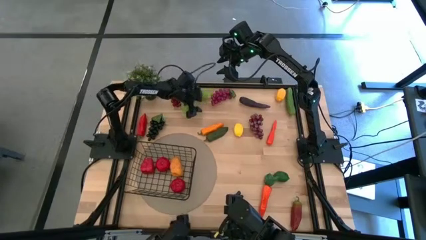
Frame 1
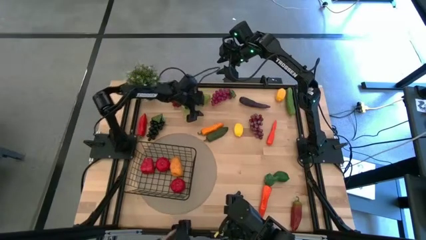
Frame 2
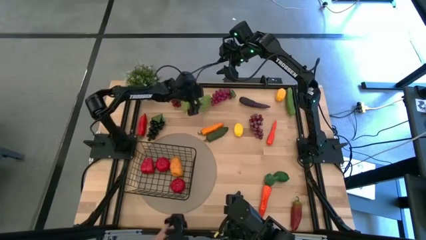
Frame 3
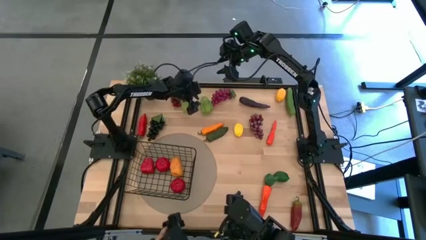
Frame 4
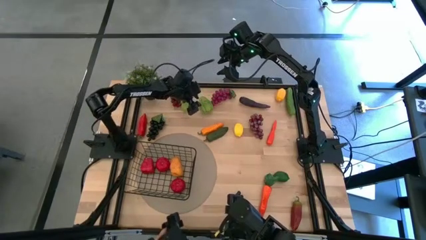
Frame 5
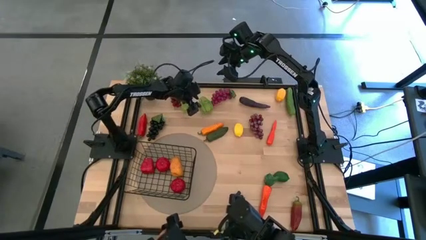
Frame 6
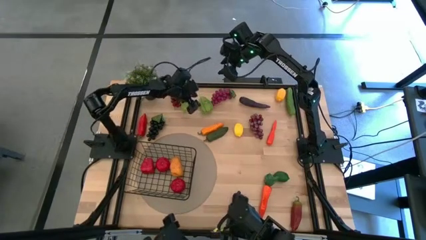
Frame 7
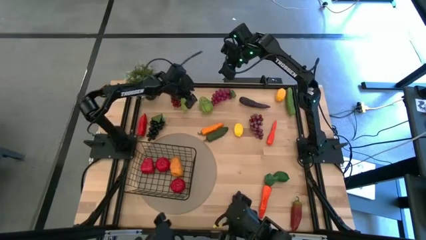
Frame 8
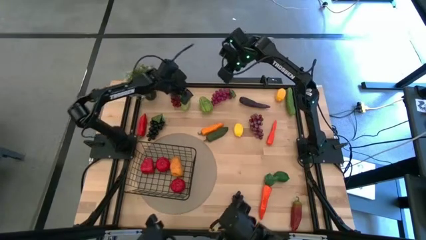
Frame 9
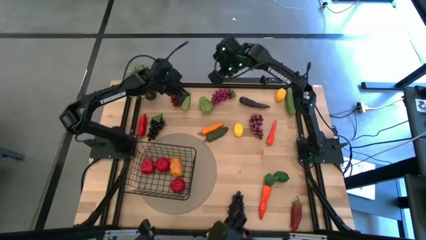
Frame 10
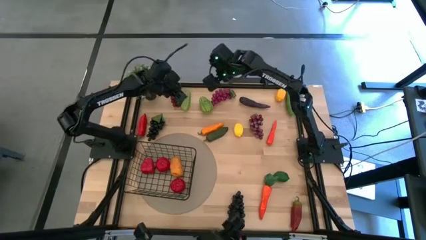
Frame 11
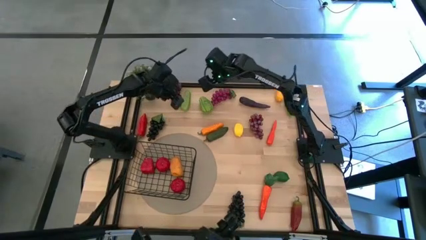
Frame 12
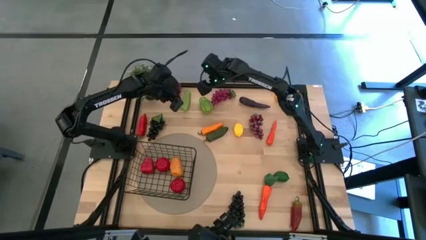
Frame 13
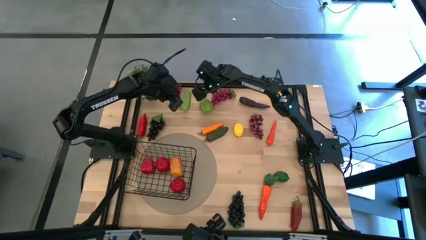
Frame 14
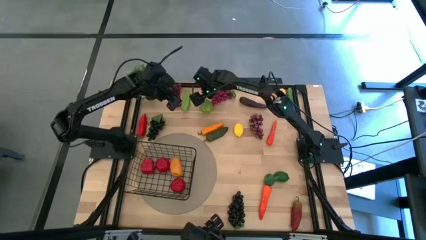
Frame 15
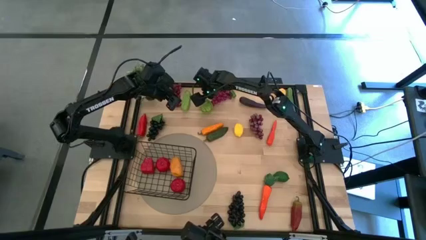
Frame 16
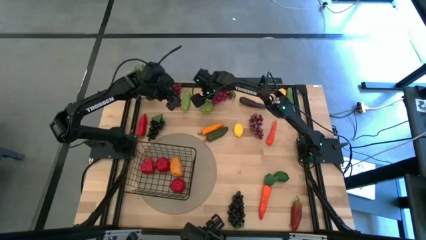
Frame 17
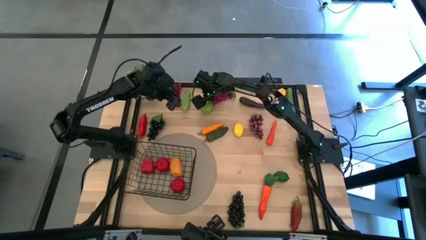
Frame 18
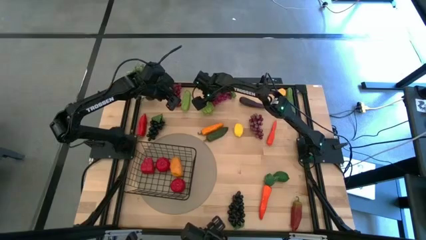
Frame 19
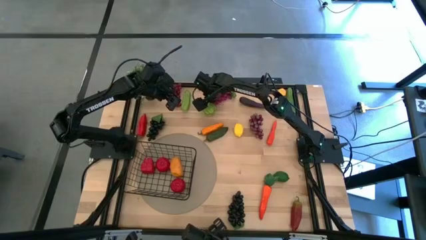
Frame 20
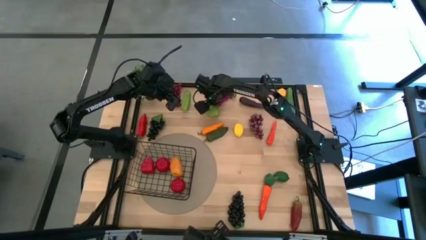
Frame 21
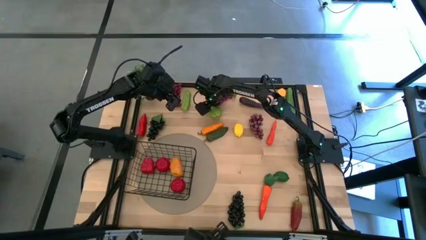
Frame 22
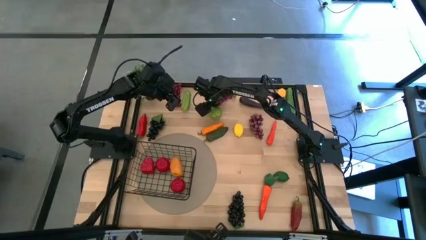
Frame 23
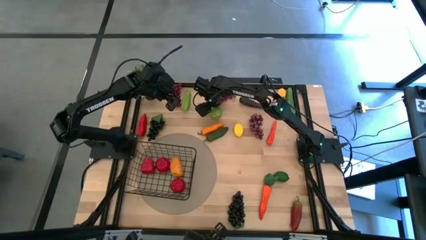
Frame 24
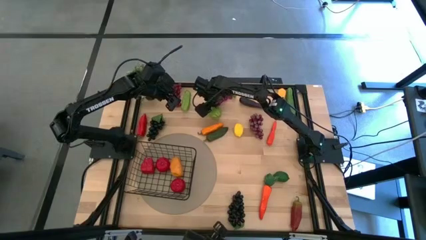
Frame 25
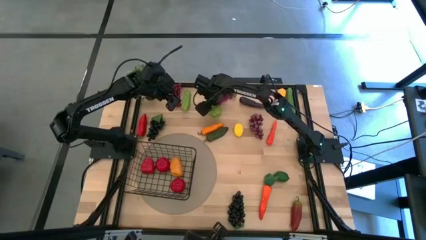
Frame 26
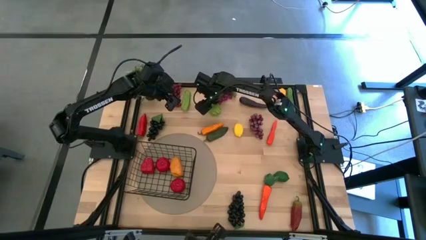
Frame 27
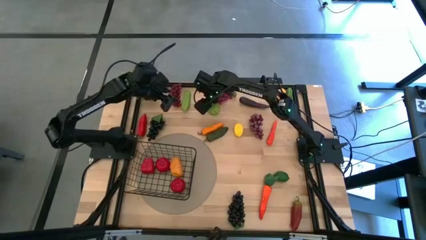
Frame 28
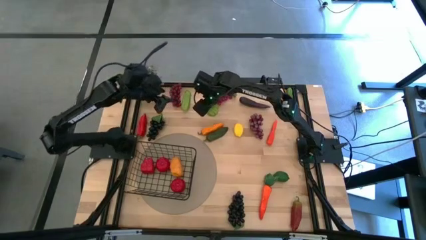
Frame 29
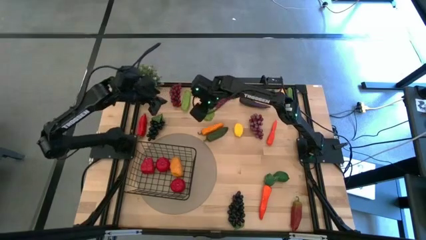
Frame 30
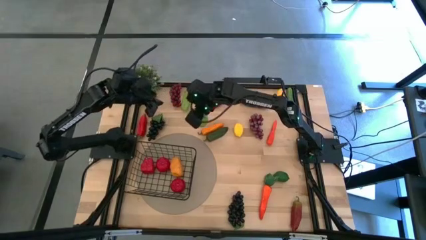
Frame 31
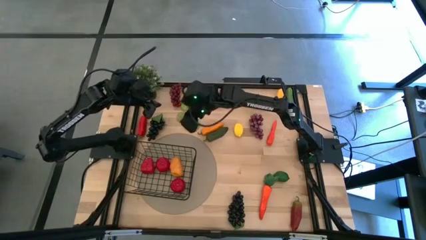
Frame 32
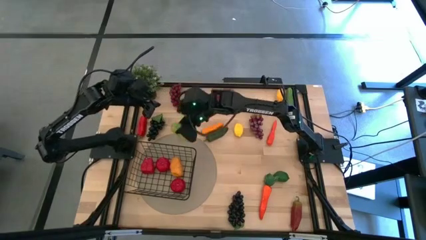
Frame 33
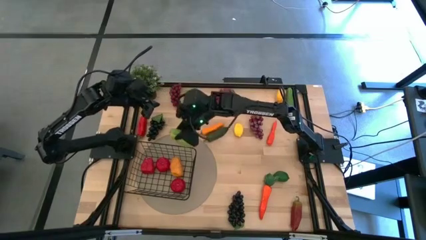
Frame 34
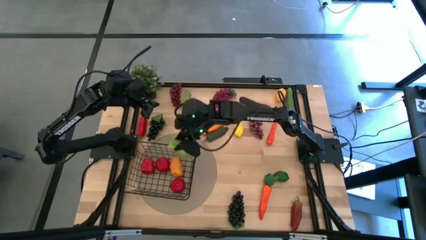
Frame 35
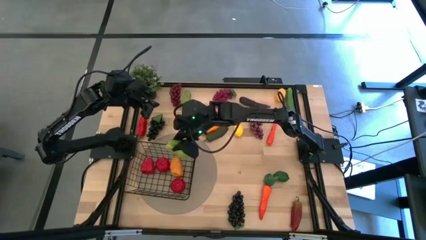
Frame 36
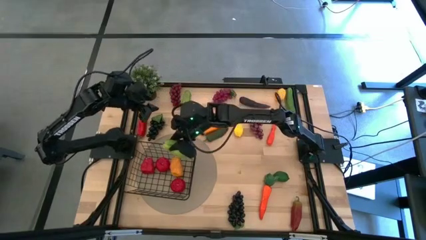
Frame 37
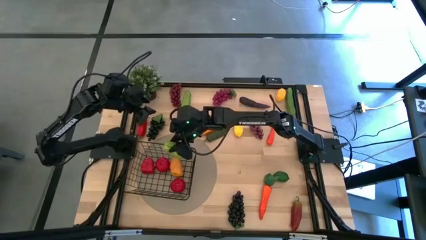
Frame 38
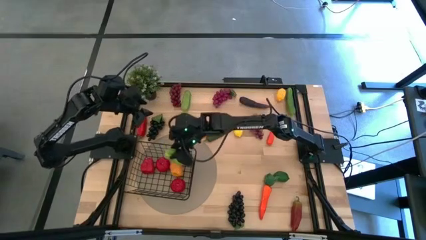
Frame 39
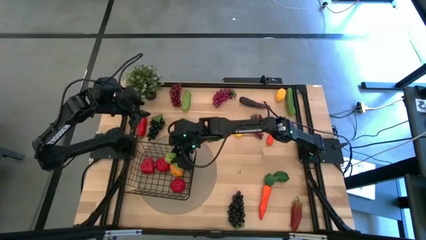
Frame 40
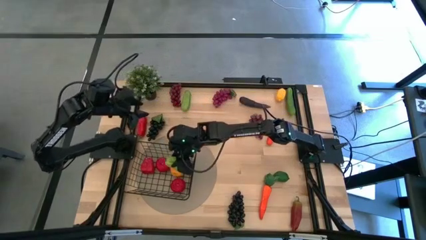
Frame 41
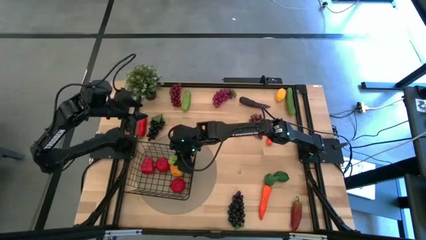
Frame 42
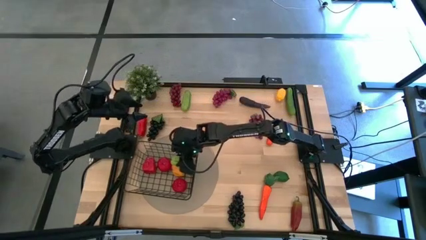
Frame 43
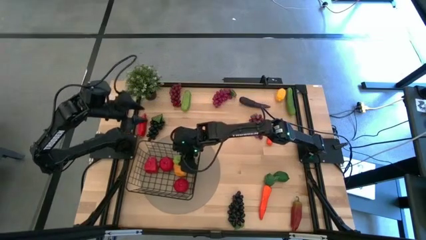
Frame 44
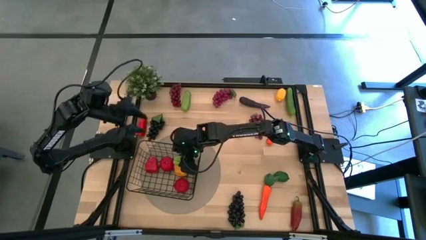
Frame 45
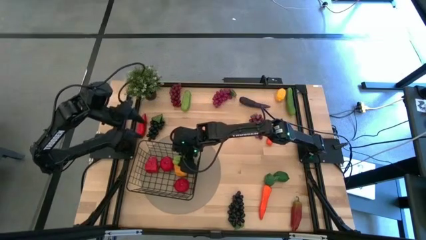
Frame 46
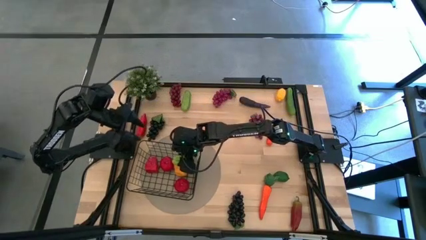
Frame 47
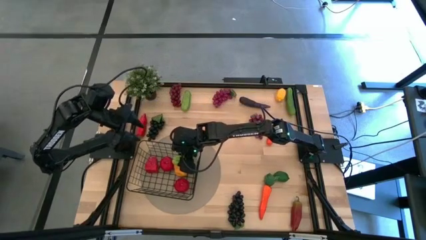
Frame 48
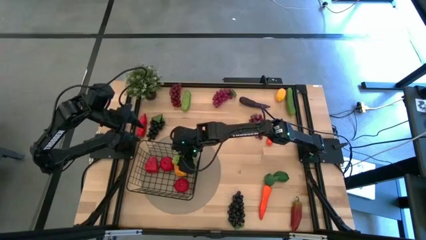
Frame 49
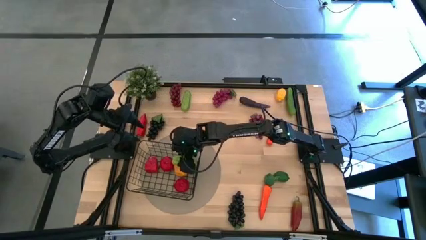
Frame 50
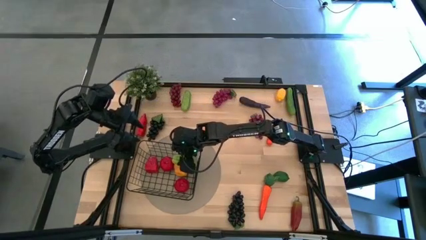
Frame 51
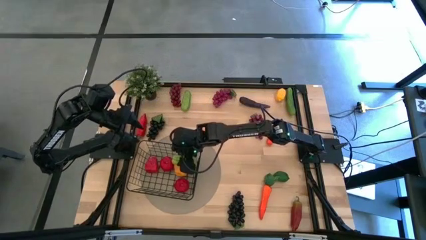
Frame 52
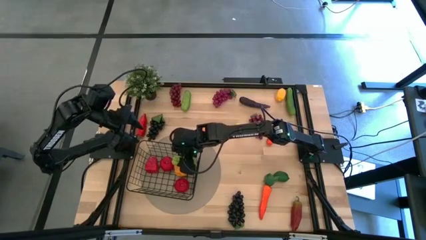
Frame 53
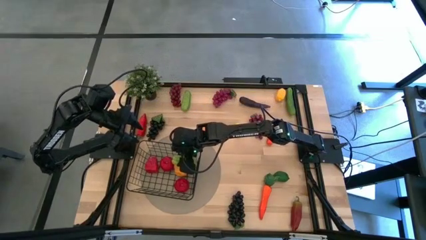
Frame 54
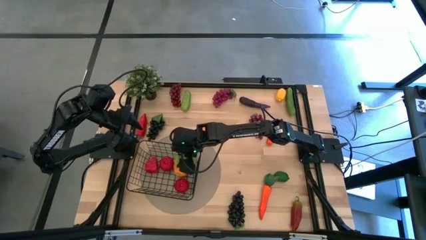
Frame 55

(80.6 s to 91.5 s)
Task: Build produce basket
Put the green chayote into the black wire basket
